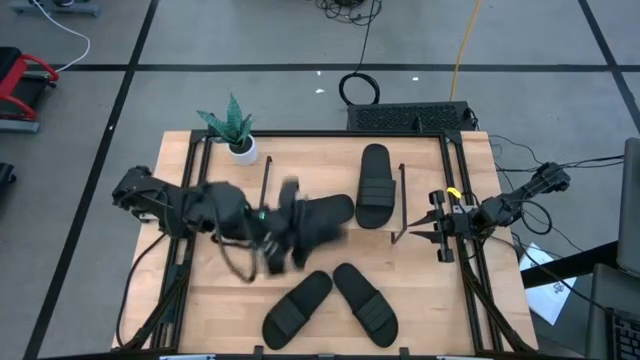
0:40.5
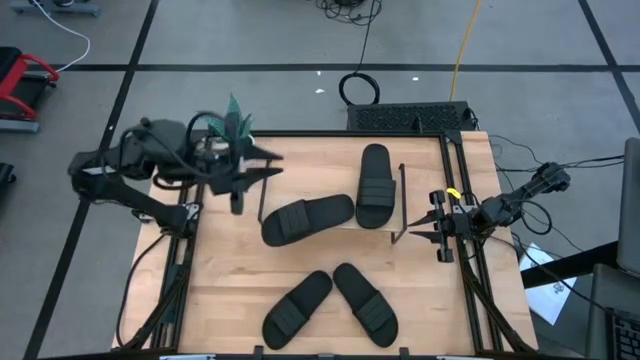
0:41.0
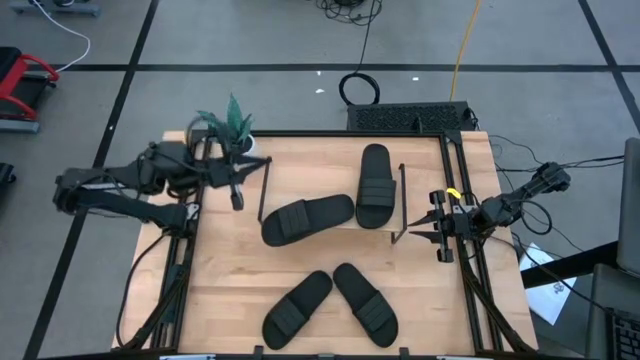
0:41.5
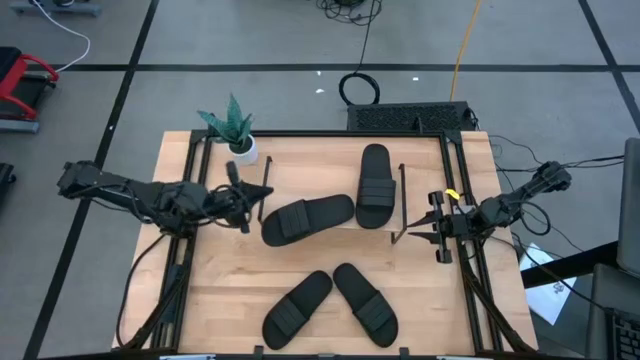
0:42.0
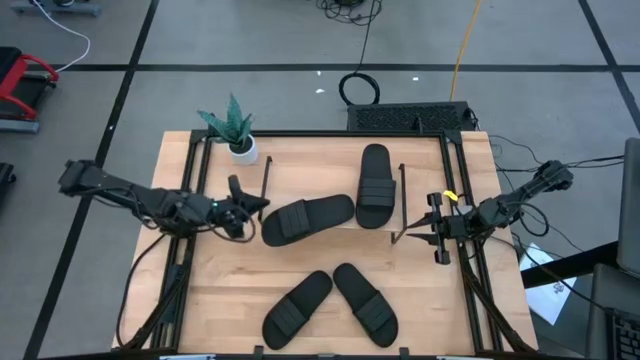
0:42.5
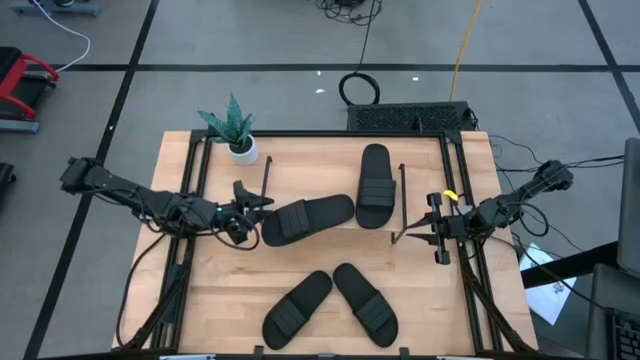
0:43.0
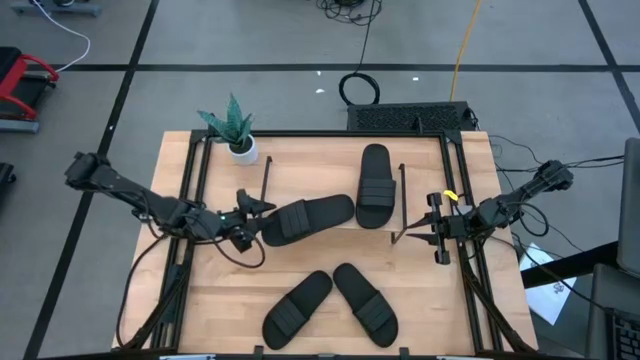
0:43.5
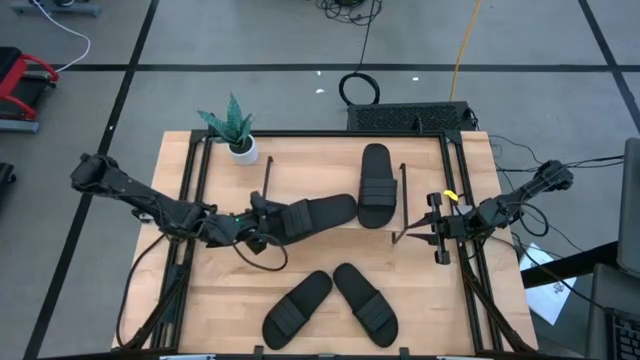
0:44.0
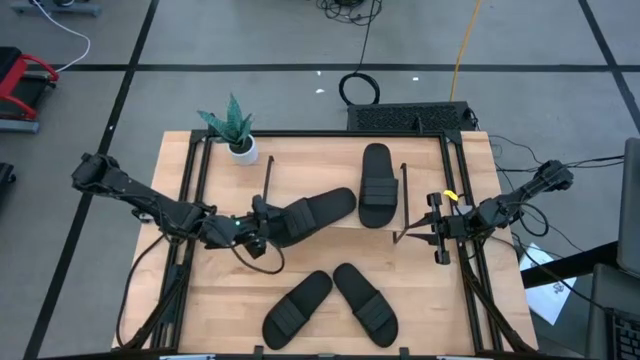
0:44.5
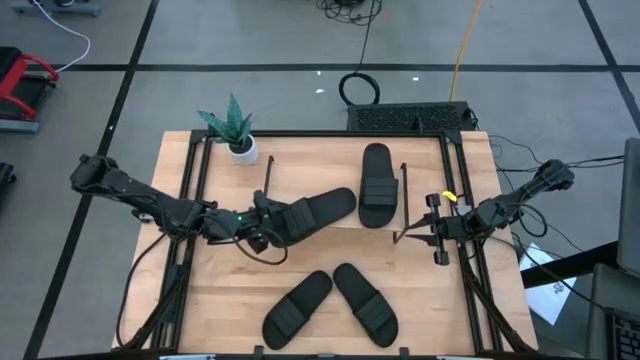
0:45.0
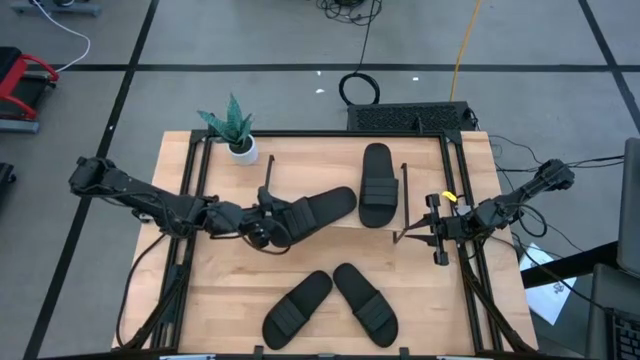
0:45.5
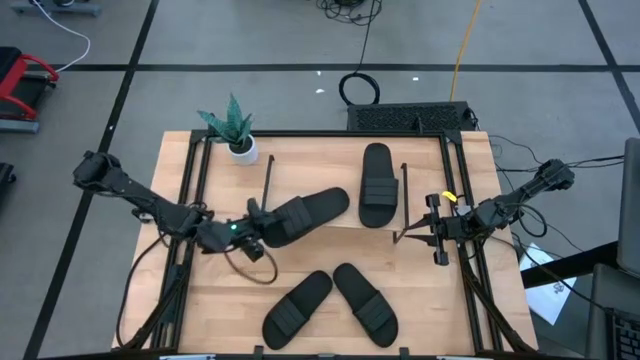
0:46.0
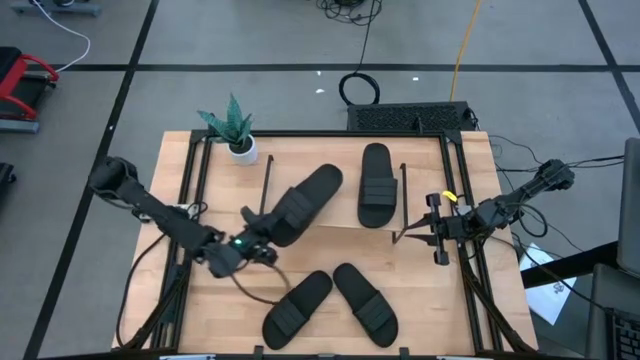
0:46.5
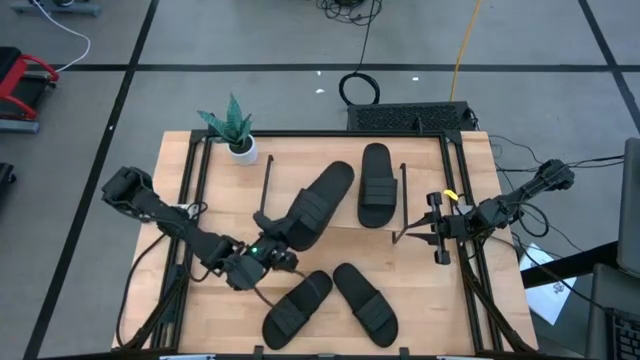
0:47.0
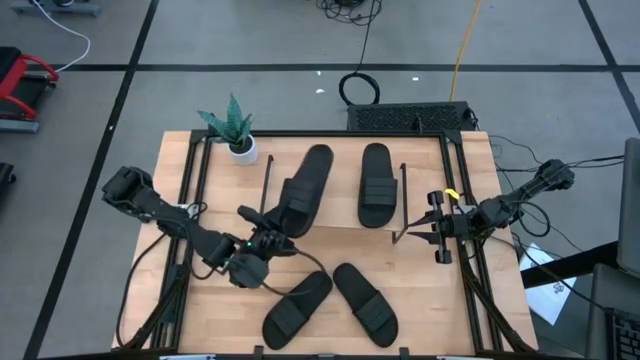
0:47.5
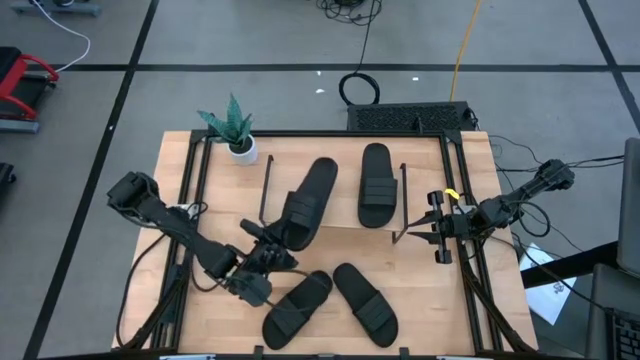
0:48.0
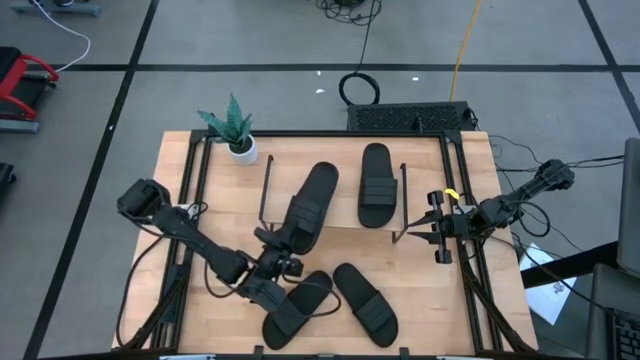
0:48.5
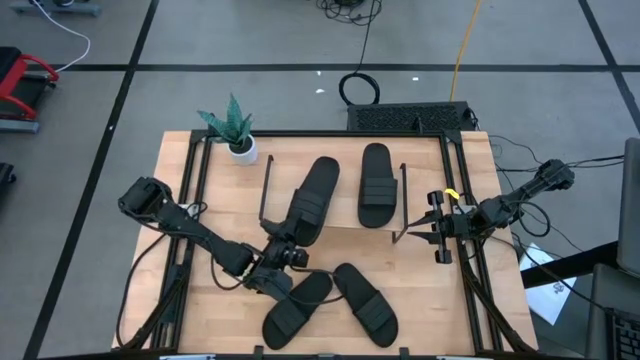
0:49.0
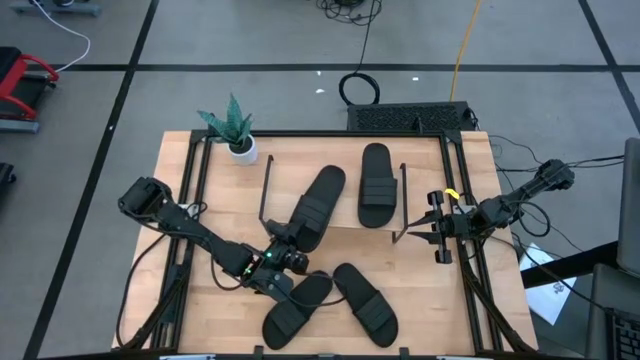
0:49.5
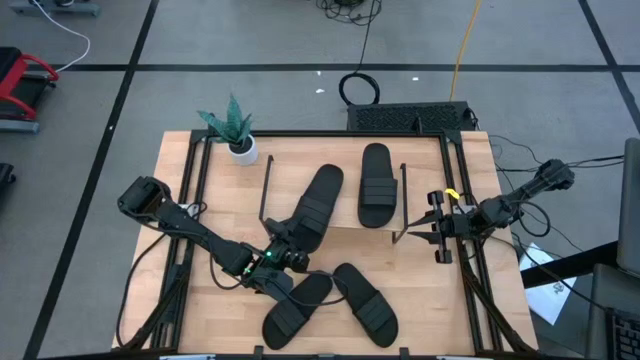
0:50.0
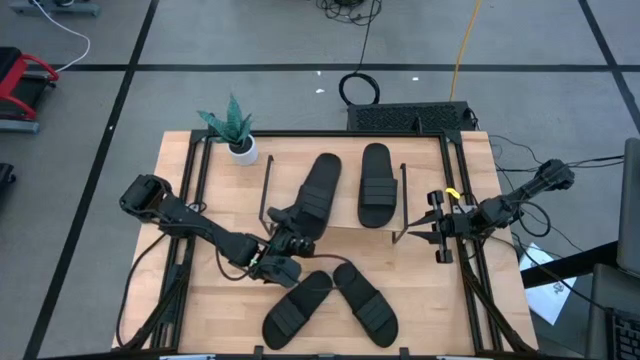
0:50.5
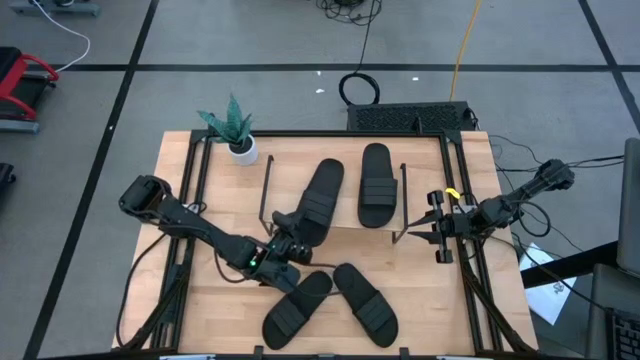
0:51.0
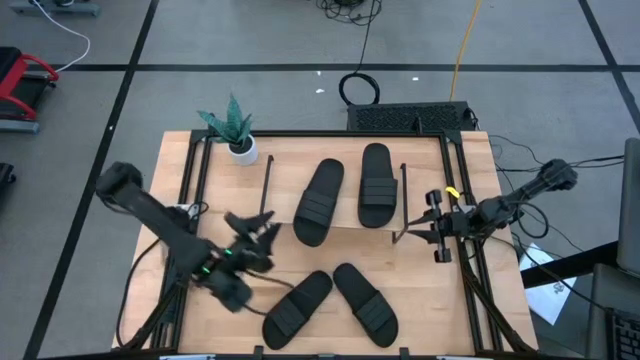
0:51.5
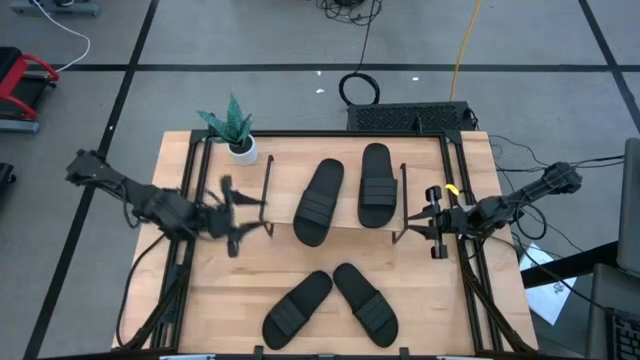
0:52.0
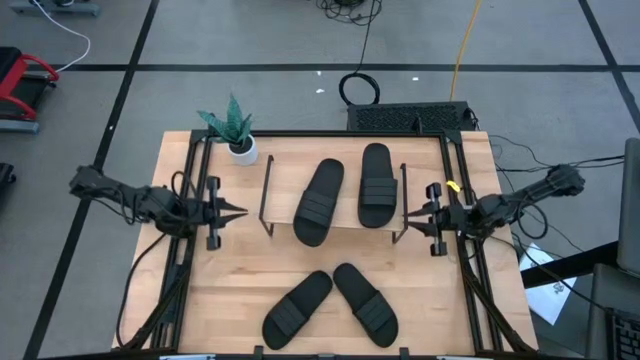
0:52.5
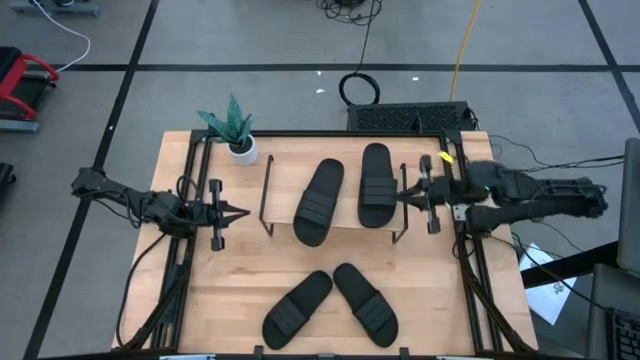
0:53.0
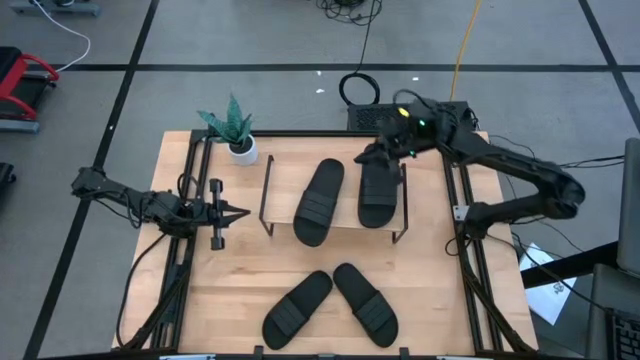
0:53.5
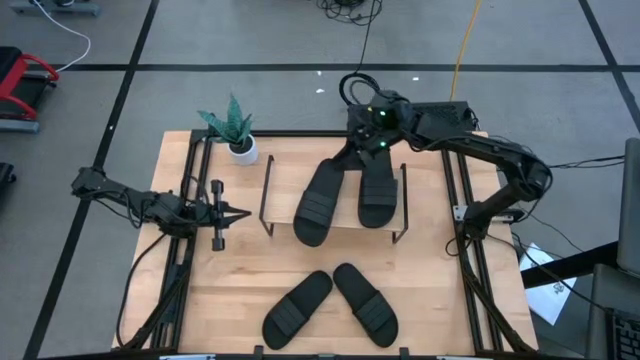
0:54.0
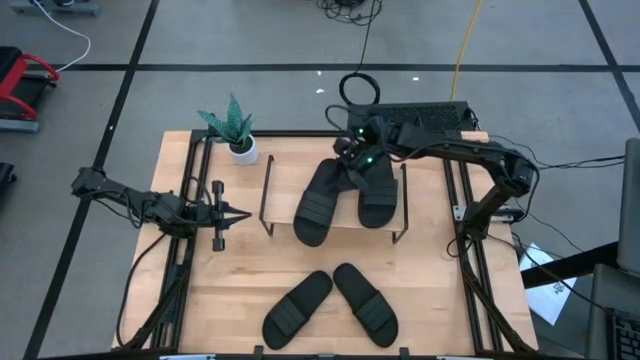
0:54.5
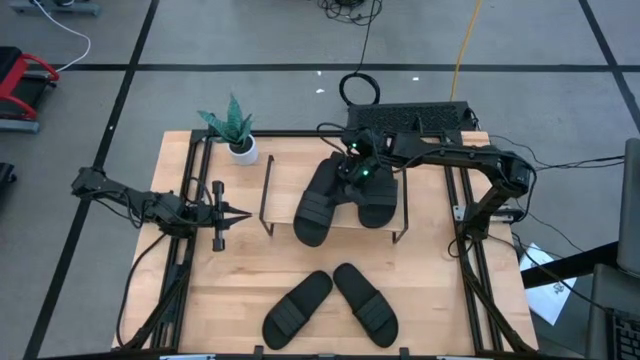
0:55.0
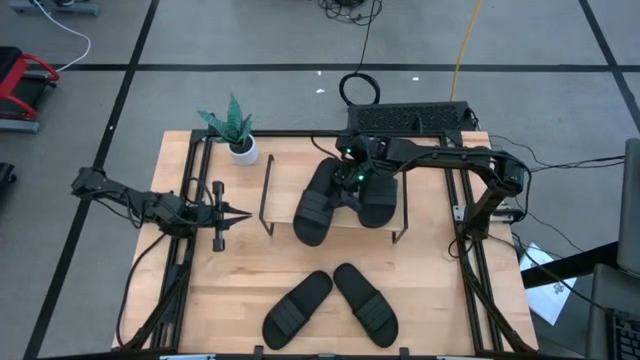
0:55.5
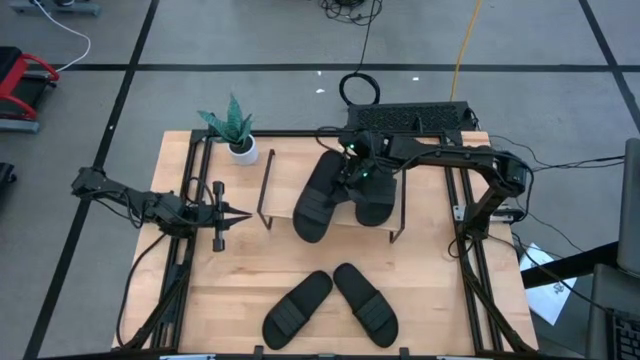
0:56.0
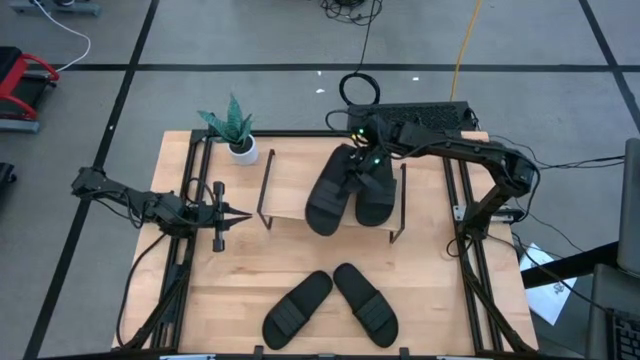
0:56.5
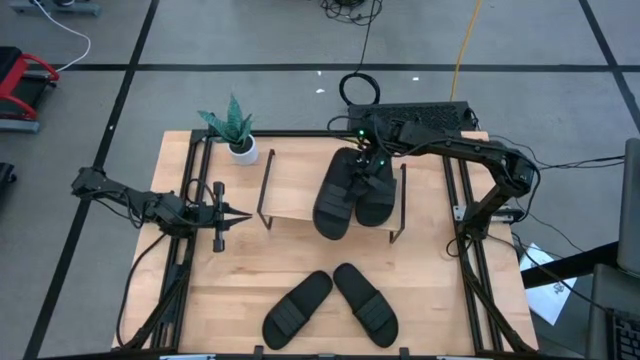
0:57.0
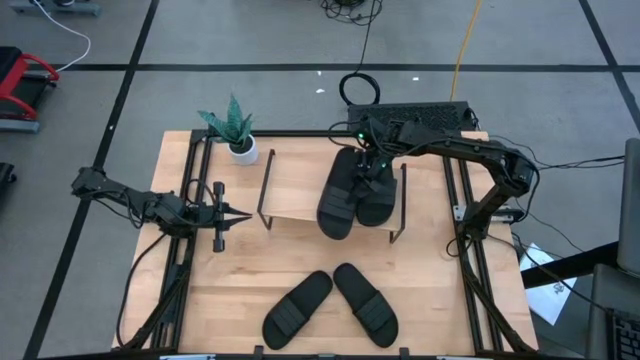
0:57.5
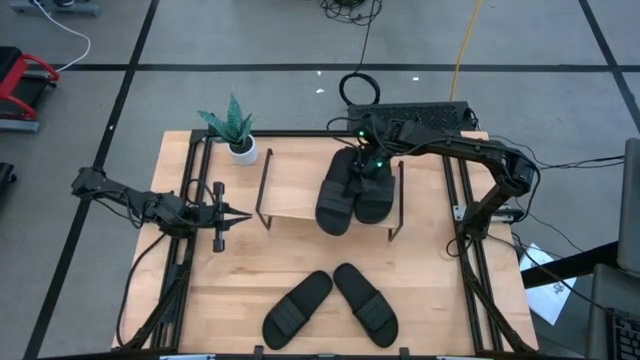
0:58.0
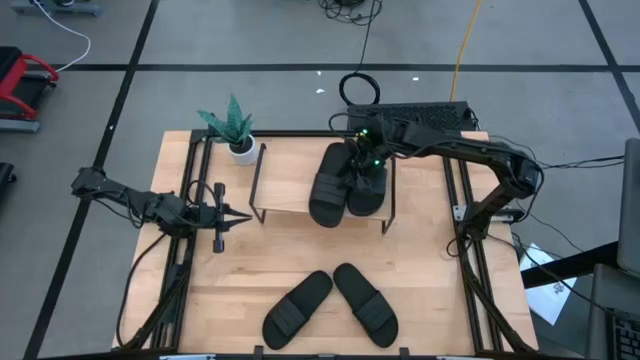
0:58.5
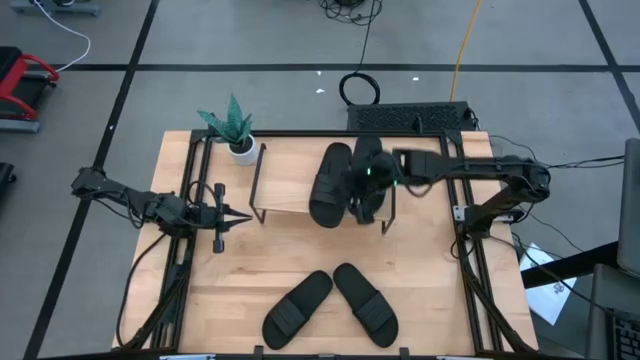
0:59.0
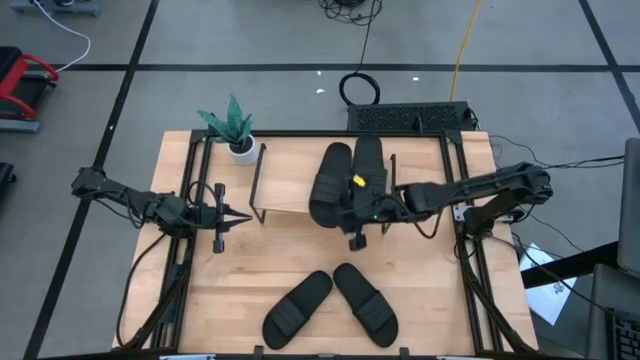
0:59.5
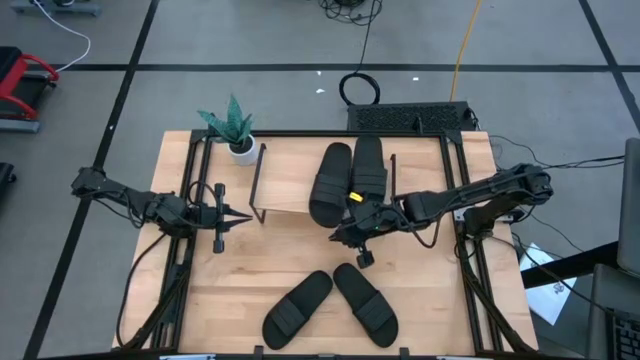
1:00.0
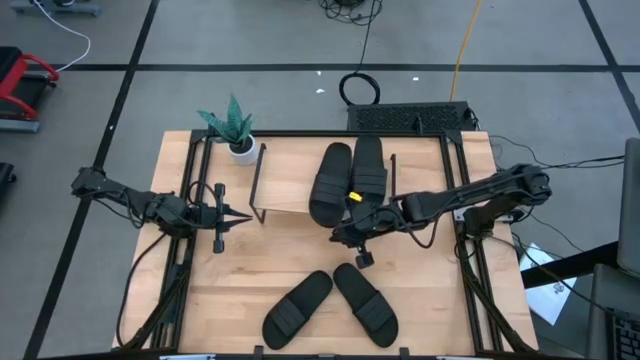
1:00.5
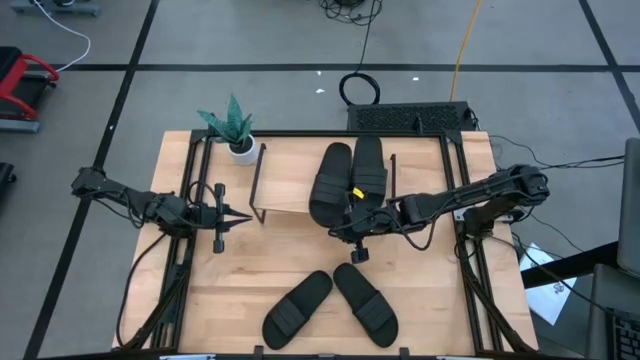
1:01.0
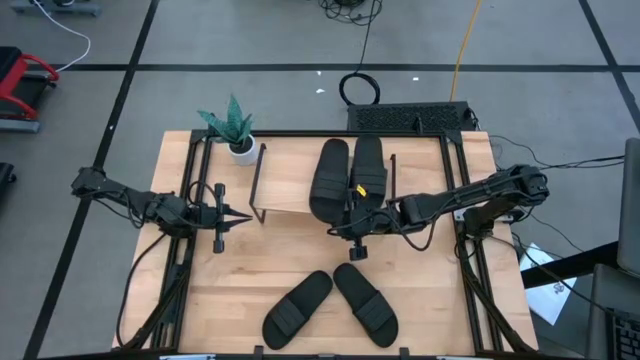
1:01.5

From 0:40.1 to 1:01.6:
Task: Pick and place slides into the shelf
Put the top left black slide on the shelf
